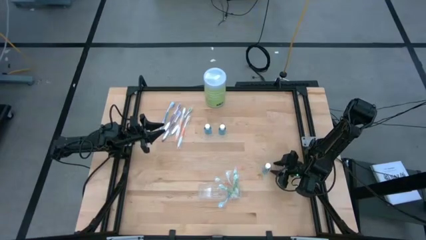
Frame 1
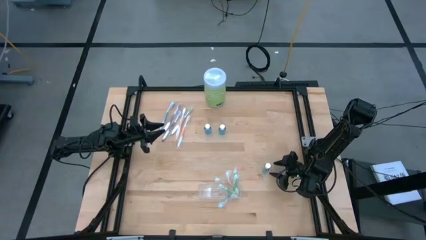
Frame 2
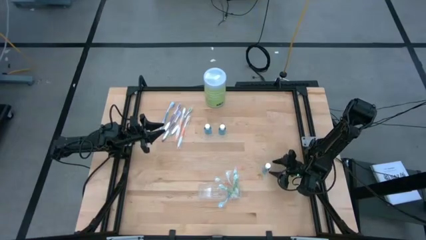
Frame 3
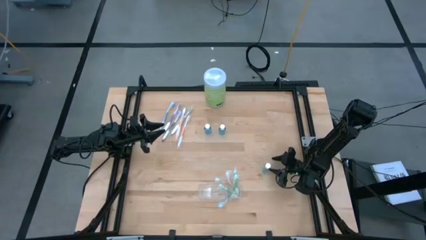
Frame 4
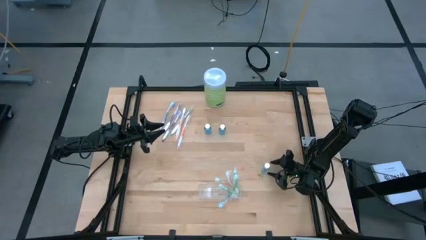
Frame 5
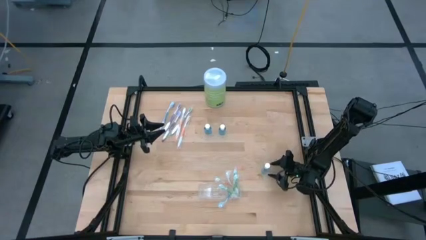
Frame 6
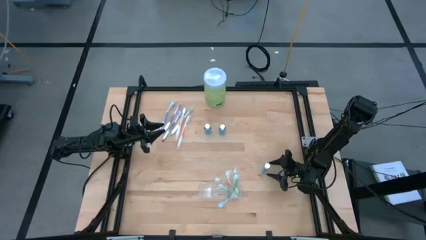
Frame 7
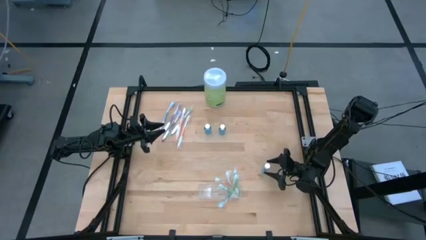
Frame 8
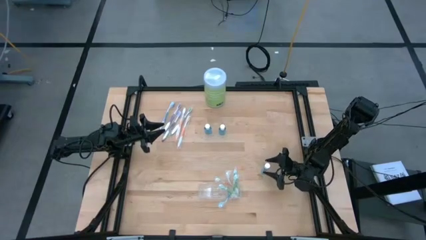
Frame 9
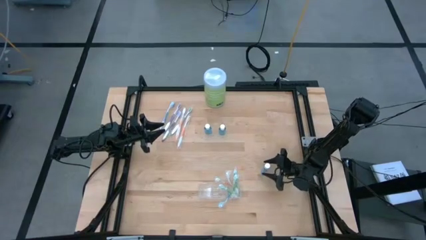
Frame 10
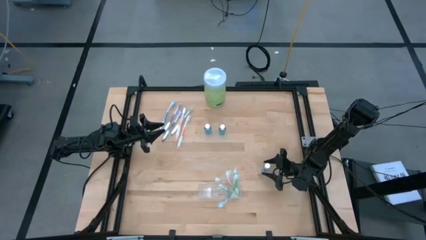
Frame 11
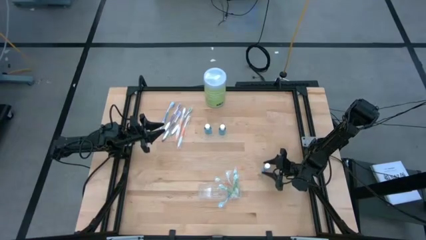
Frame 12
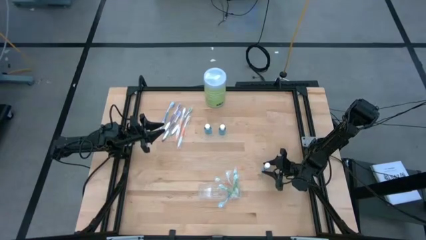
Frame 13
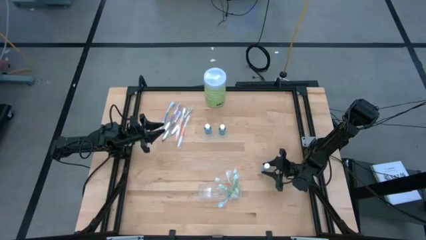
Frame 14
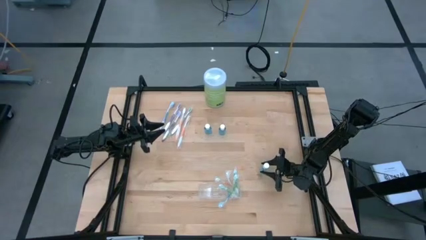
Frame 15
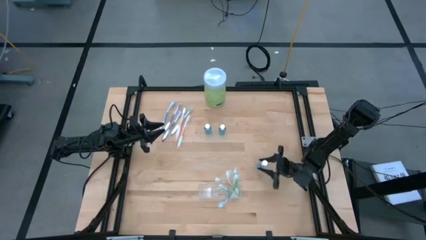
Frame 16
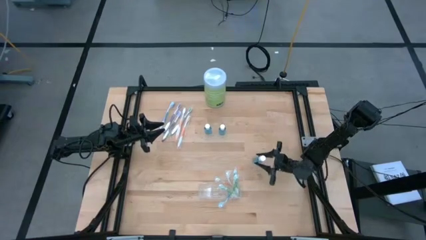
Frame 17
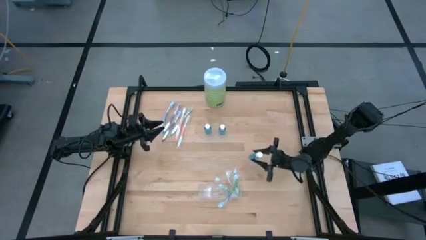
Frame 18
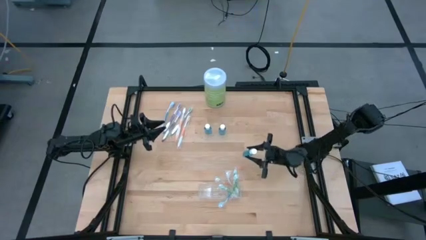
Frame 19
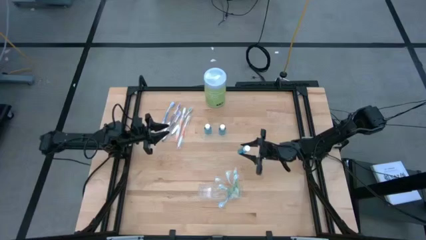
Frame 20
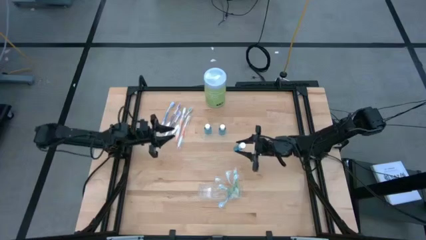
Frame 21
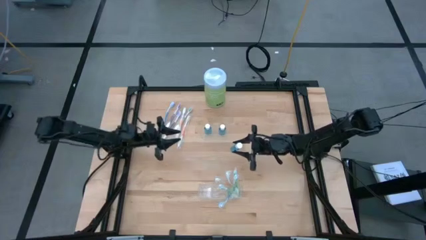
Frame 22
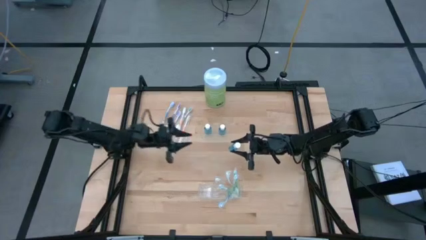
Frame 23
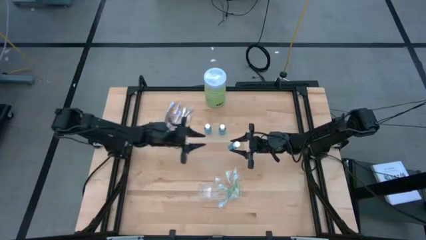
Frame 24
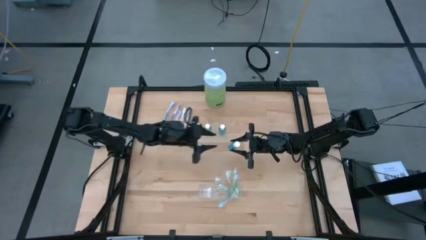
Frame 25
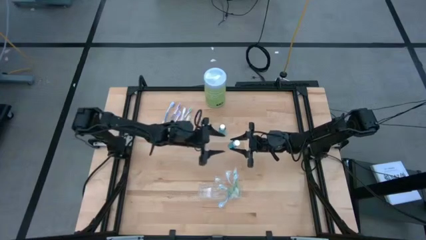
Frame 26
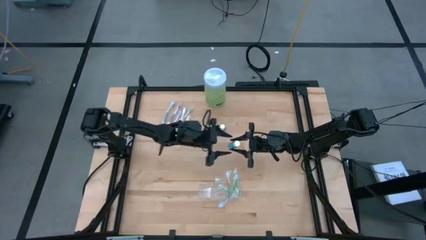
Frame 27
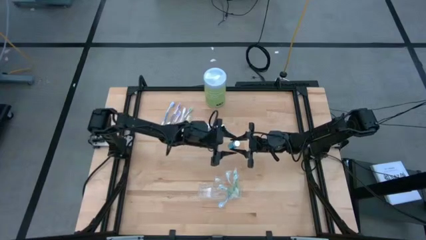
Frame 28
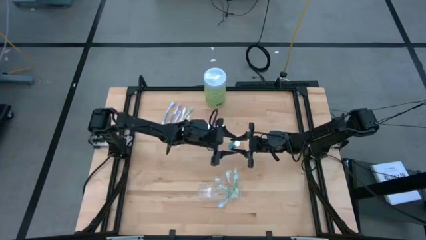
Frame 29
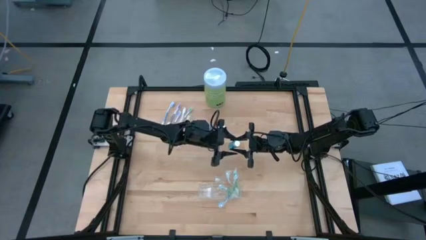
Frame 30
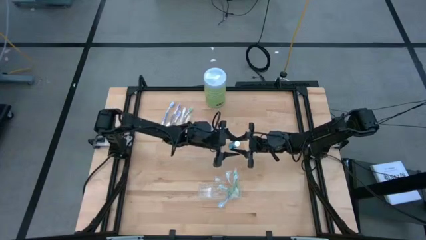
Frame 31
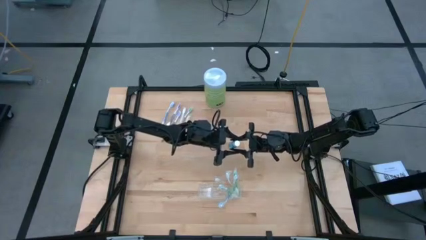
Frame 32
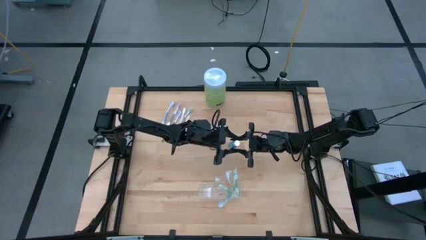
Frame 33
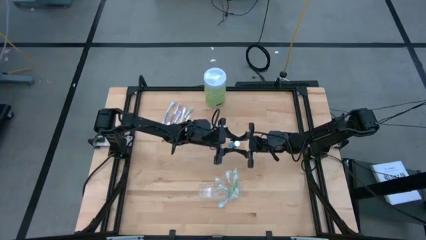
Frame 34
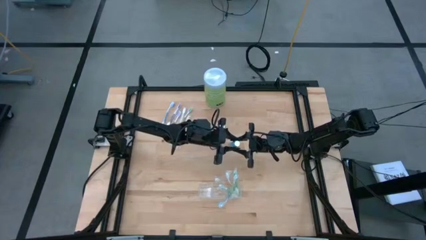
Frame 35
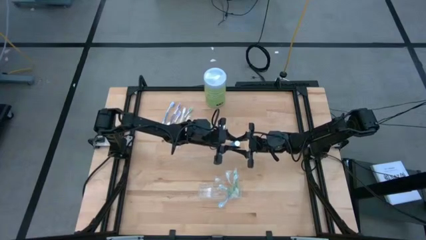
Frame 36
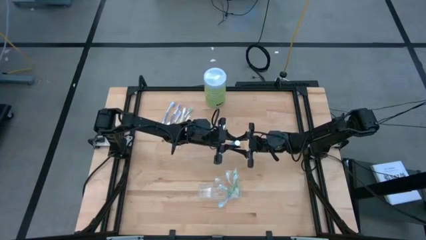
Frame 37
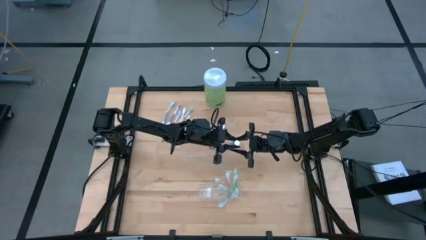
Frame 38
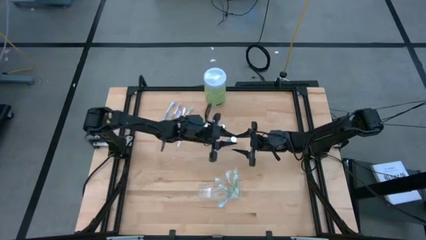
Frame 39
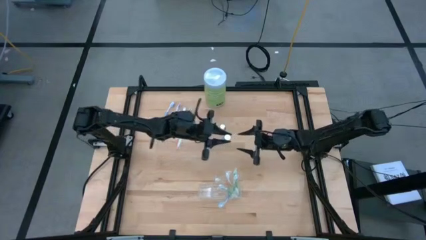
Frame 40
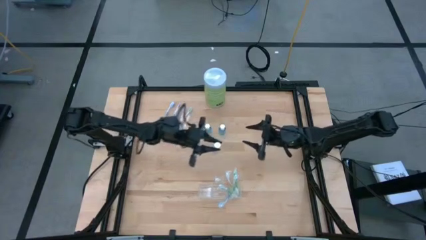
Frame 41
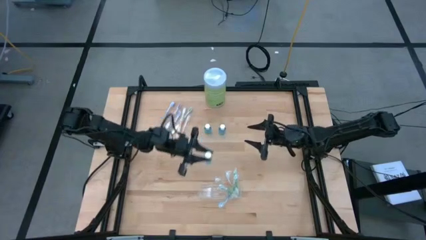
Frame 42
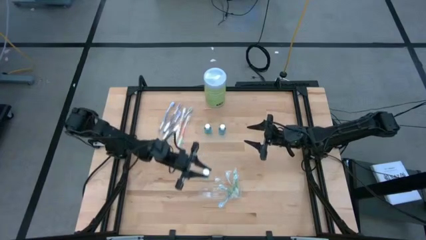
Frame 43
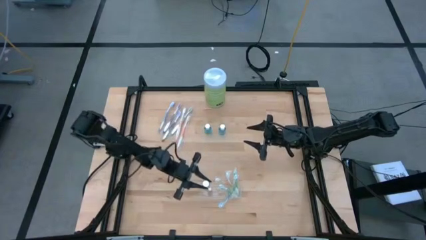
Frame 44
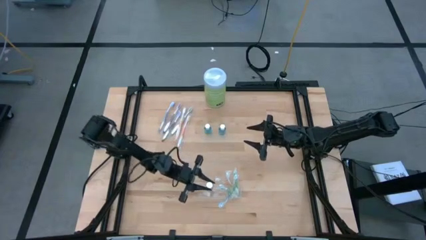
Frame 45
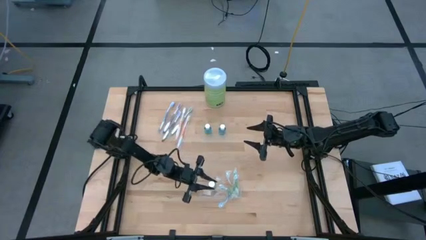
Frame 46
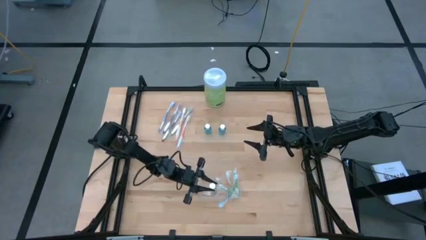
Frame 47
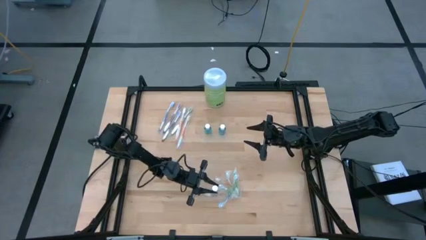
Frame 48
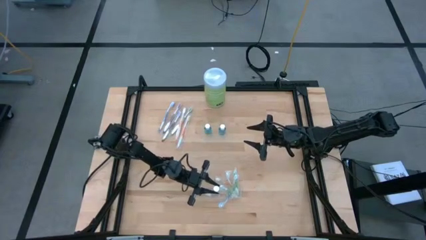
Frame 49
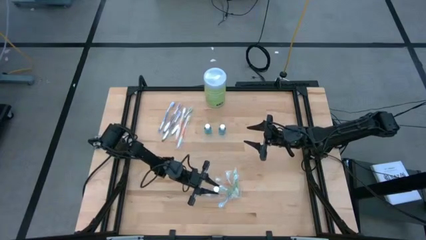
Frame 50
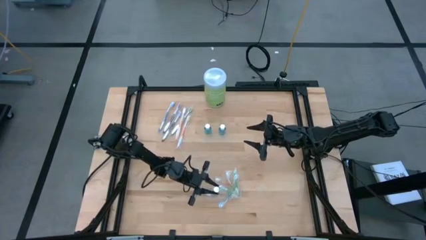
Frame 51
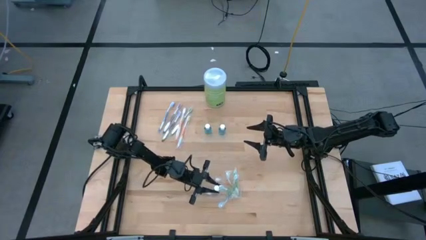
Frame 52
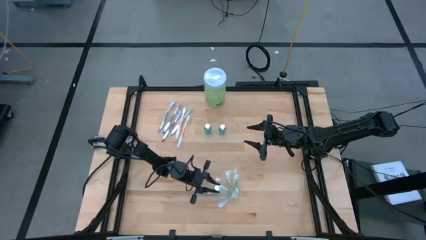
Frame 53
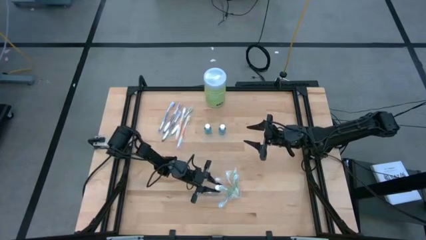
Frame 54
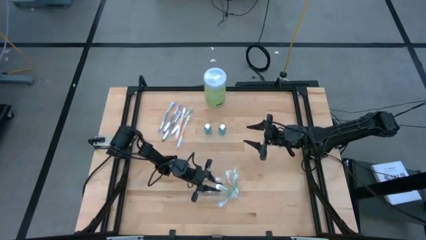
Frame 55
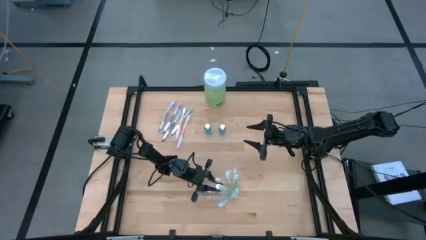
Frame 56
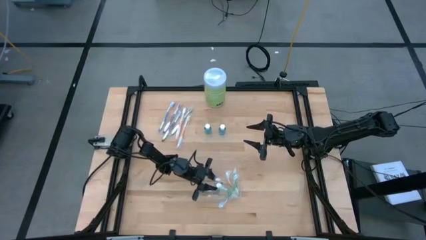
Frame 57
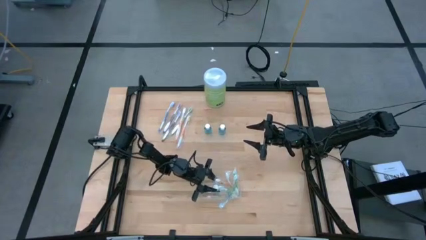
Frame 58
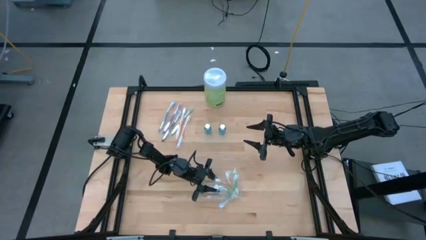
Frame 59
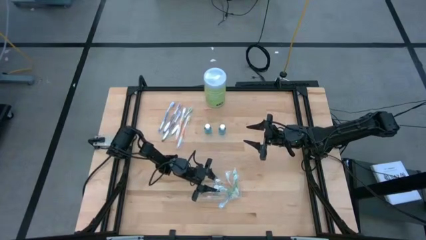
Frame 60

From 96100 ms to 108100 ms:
Task: Pick & Place toothbrushing station
Put the mouthwash into the transparent organizer
